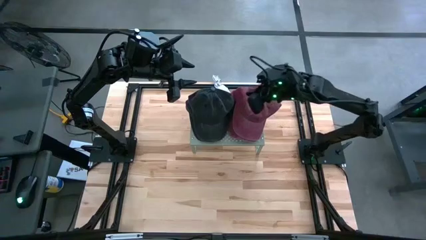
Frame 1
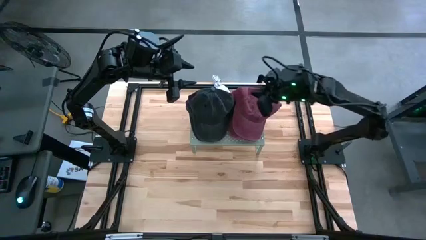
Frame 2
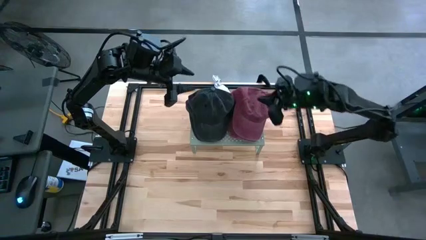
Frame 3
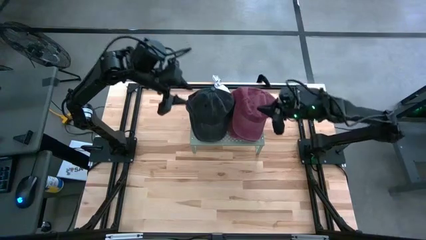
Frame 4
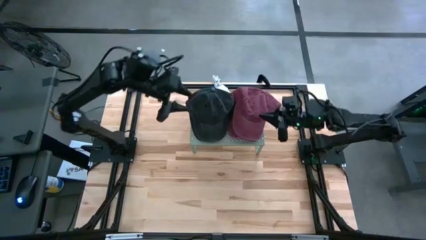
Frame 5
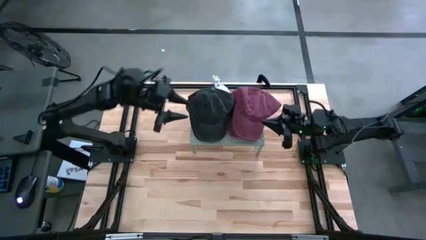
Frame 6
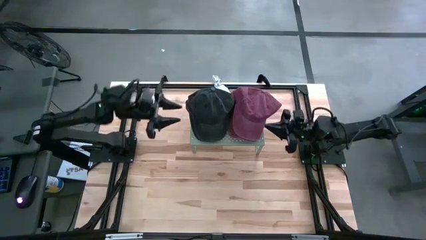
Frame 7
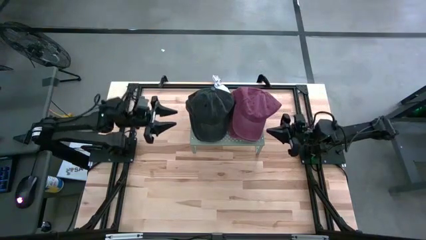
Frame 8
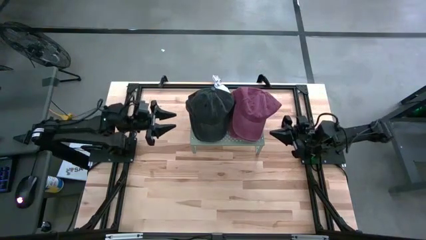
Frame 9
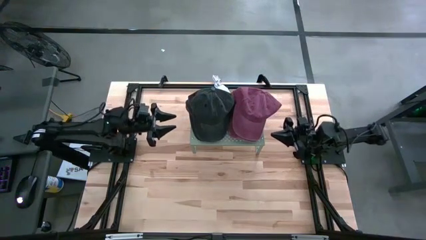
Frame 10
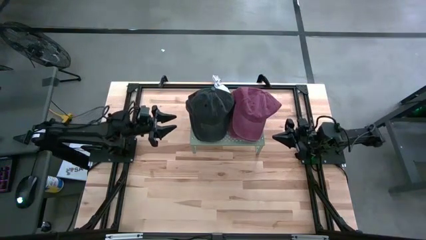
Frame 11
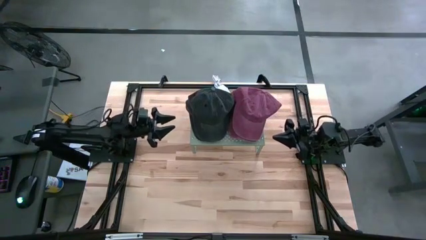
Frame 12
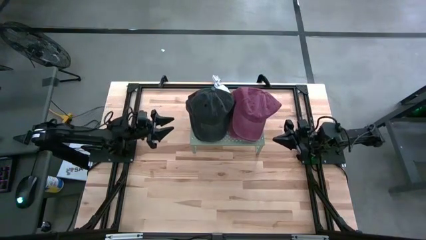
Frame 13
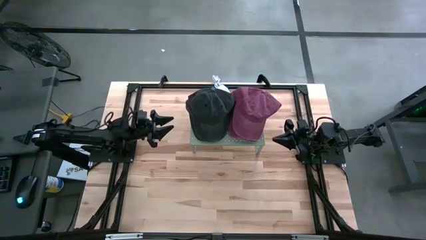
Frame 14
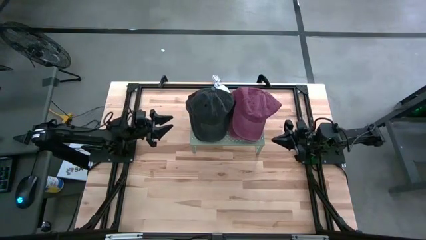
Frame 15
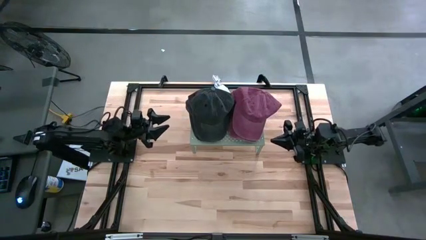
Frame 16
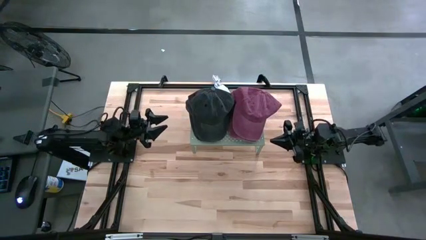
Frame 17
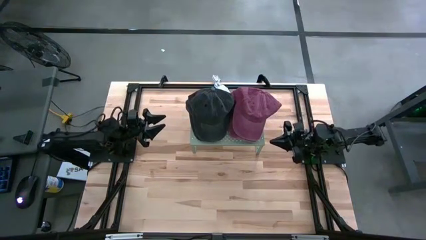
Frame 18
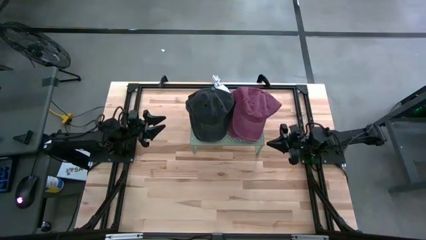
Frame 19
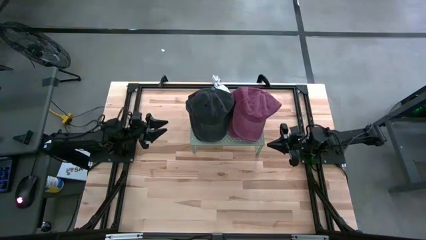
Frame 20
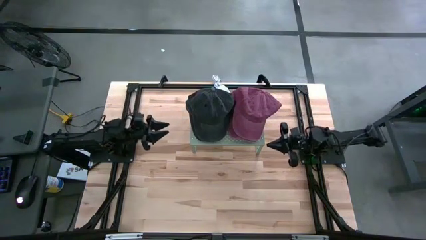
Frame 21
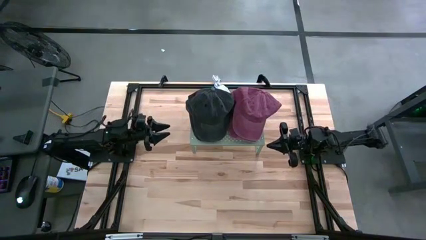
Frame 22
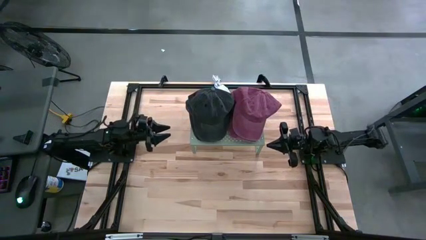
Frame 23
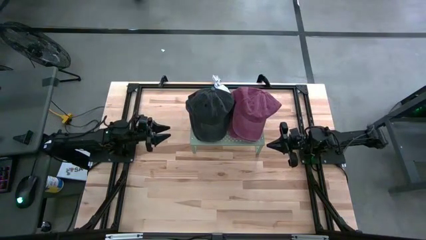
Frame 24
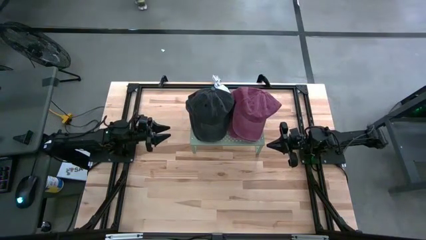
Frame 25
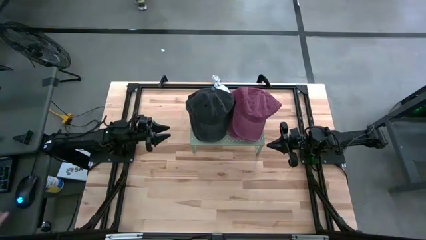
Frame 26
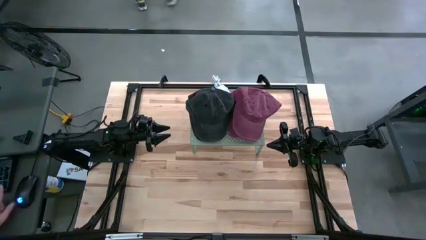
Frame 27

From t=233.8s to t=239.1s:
Task: Pick & Place hat
Return to Home Position

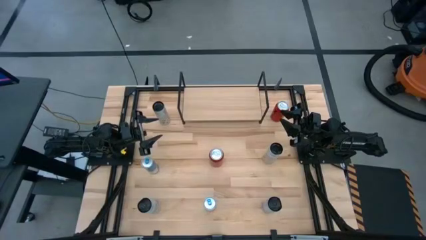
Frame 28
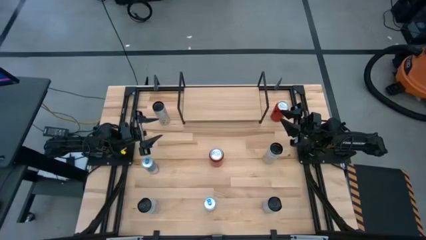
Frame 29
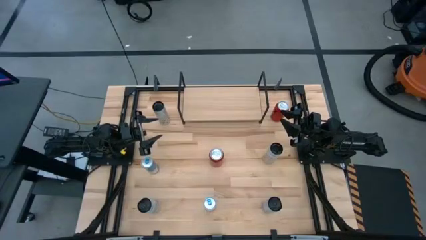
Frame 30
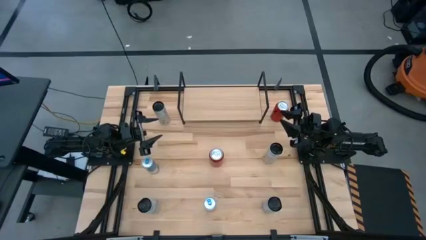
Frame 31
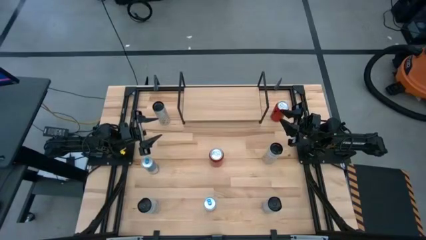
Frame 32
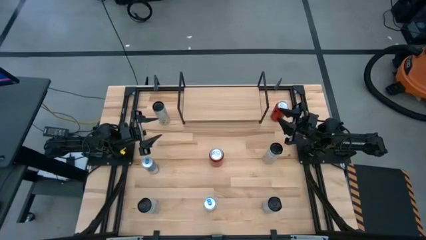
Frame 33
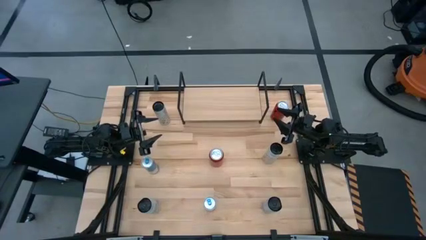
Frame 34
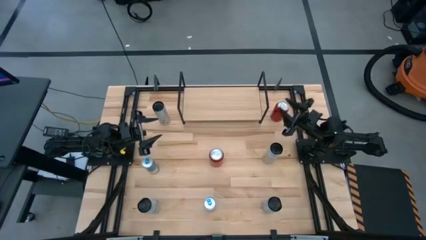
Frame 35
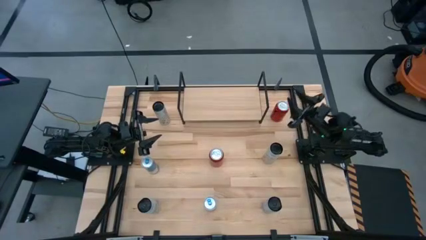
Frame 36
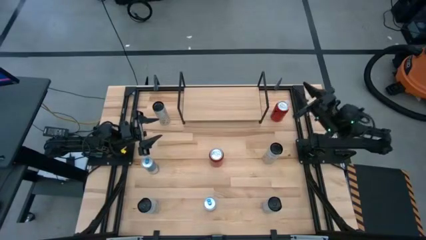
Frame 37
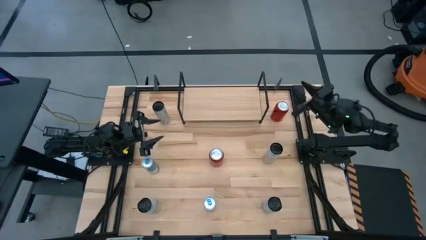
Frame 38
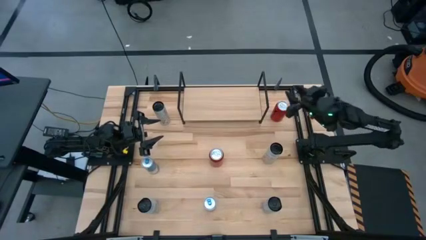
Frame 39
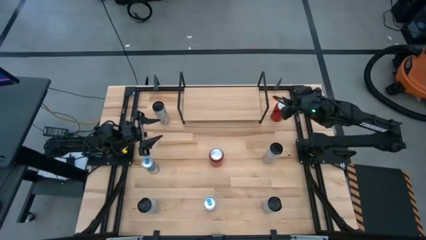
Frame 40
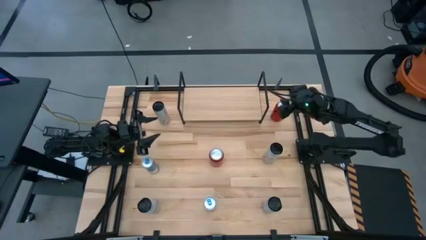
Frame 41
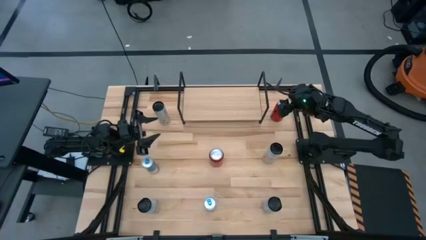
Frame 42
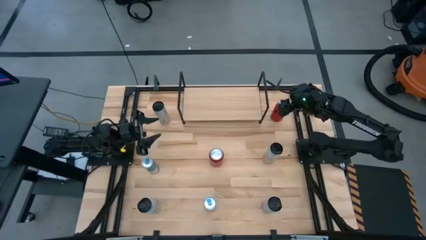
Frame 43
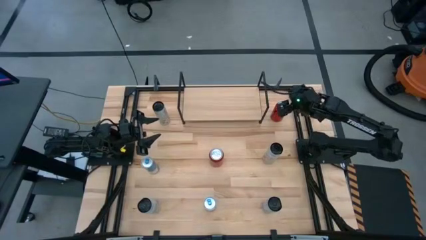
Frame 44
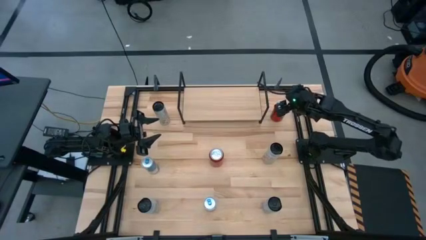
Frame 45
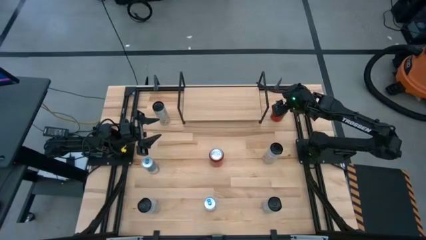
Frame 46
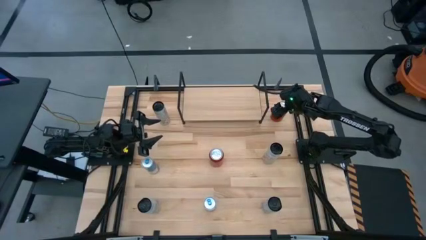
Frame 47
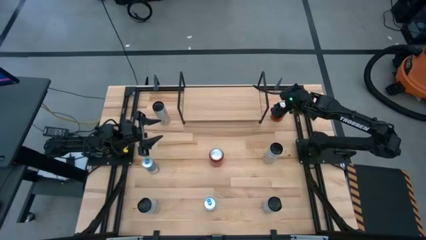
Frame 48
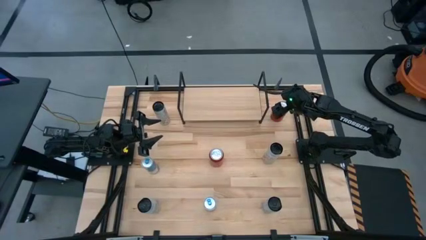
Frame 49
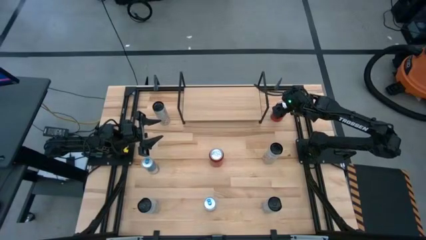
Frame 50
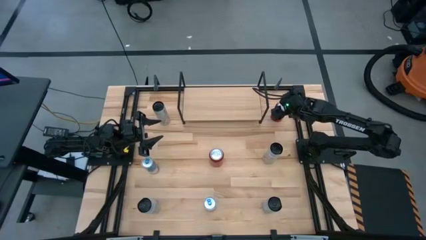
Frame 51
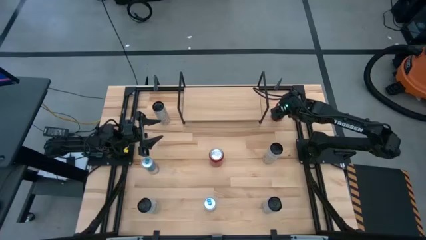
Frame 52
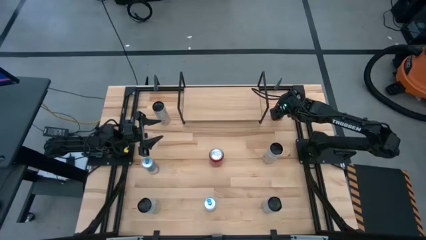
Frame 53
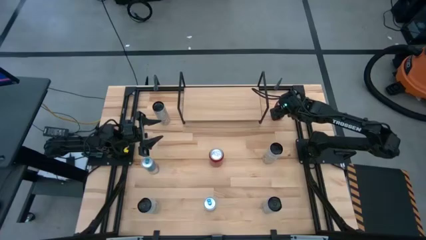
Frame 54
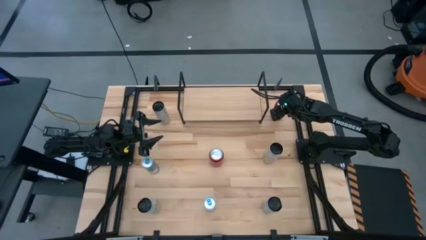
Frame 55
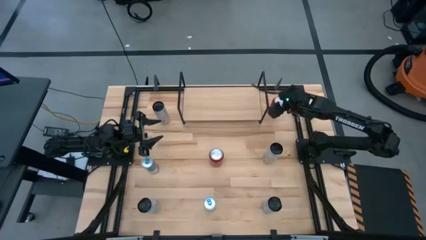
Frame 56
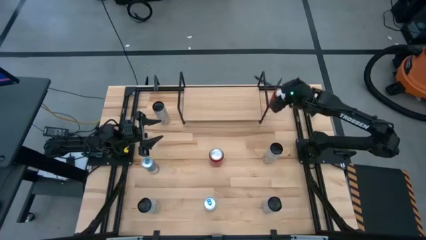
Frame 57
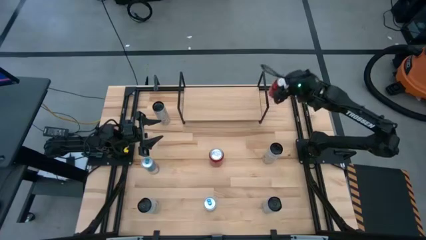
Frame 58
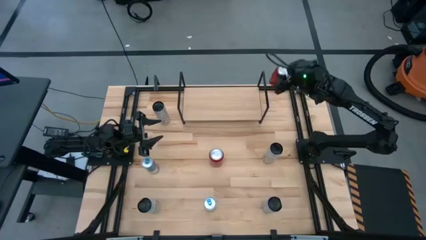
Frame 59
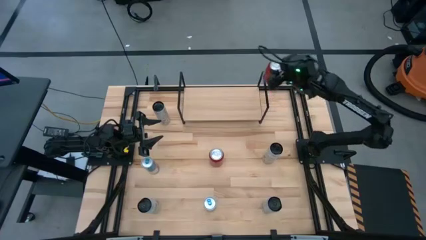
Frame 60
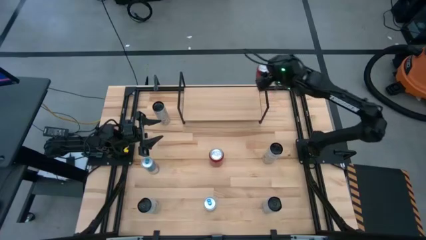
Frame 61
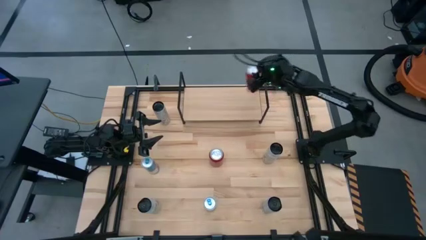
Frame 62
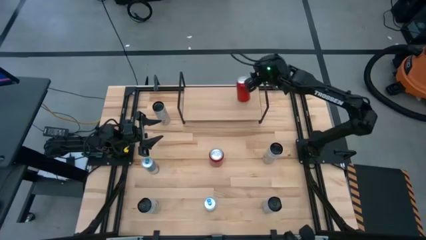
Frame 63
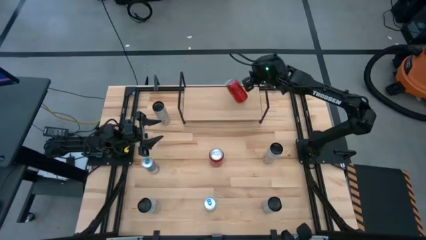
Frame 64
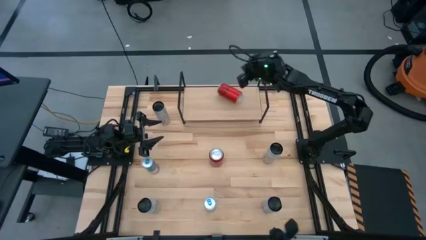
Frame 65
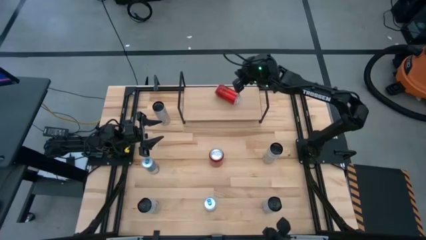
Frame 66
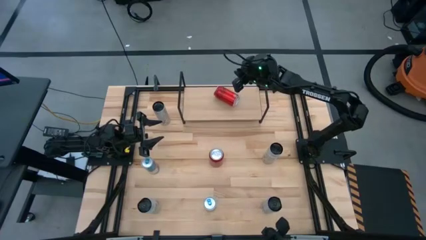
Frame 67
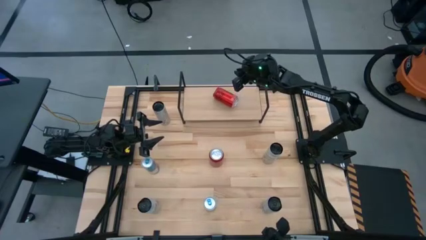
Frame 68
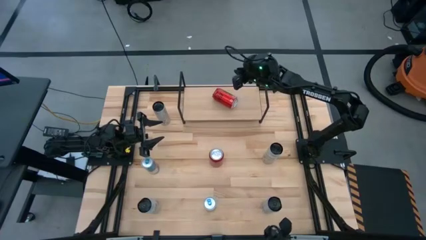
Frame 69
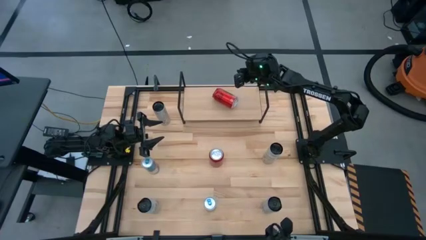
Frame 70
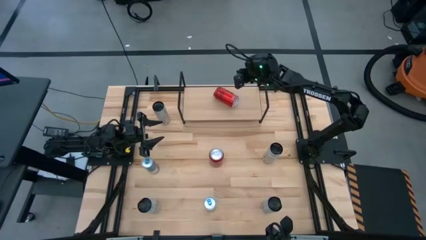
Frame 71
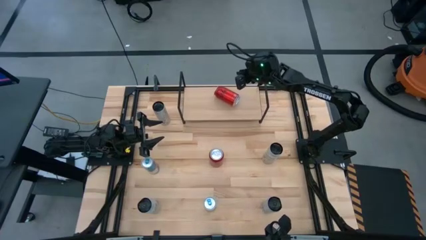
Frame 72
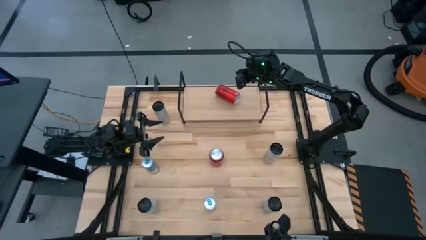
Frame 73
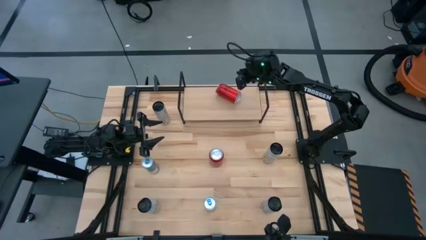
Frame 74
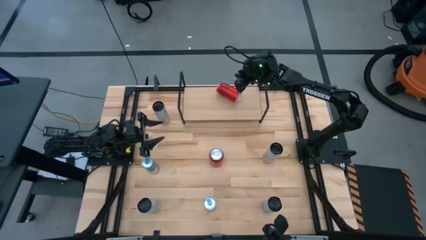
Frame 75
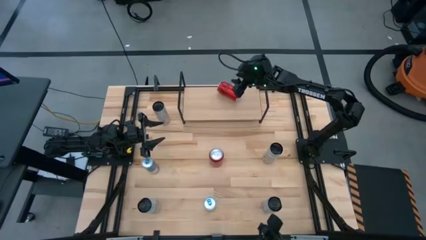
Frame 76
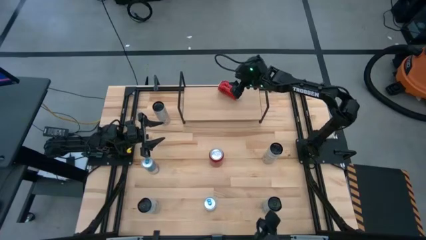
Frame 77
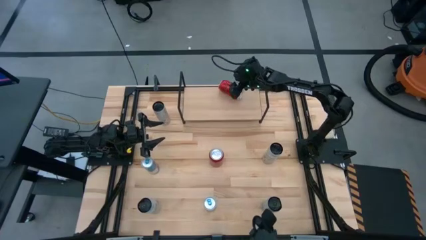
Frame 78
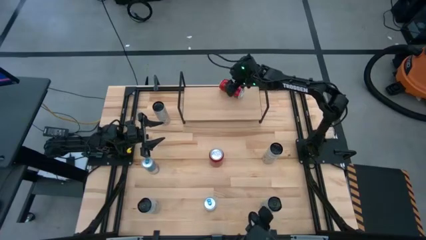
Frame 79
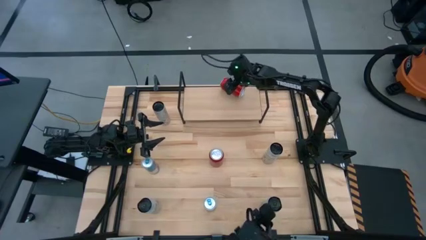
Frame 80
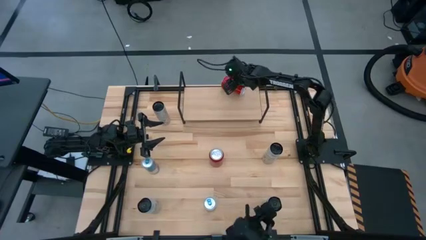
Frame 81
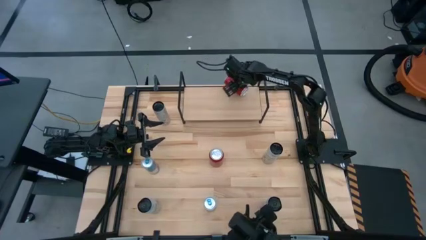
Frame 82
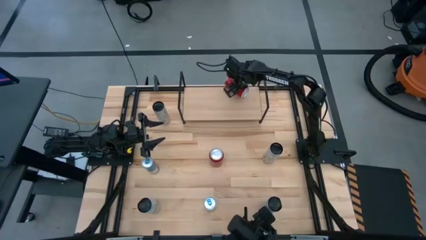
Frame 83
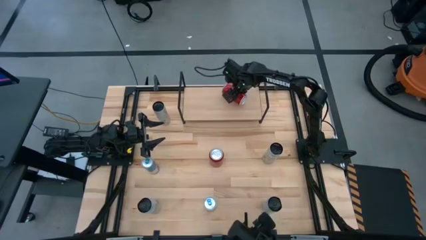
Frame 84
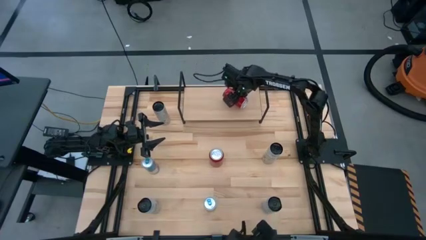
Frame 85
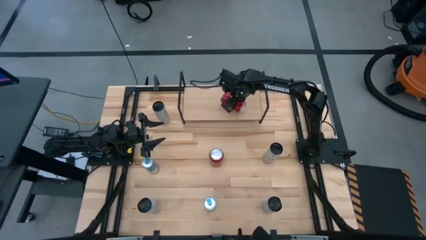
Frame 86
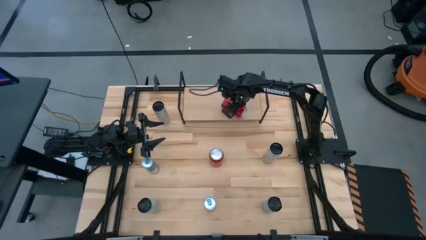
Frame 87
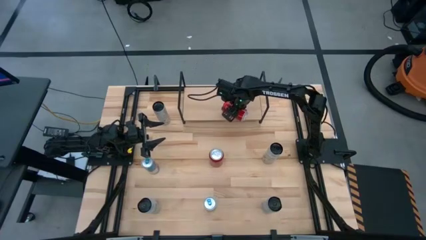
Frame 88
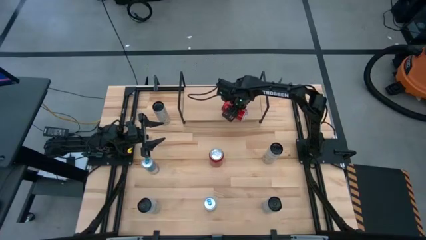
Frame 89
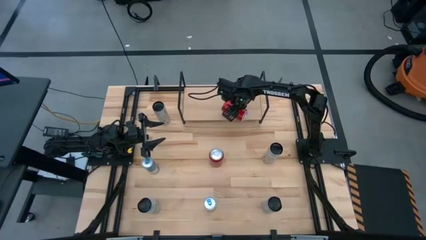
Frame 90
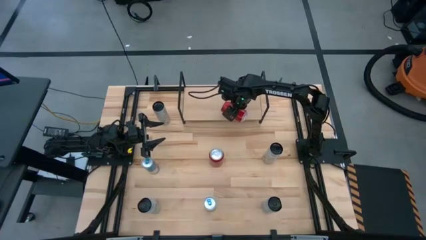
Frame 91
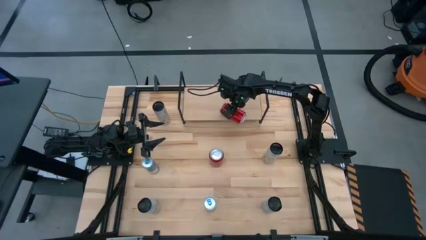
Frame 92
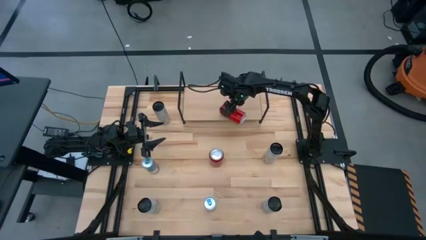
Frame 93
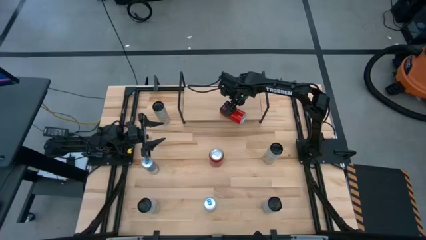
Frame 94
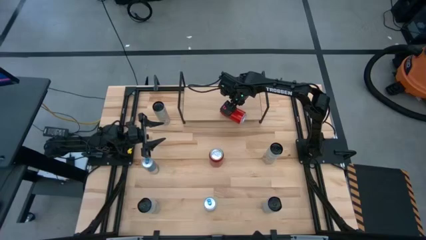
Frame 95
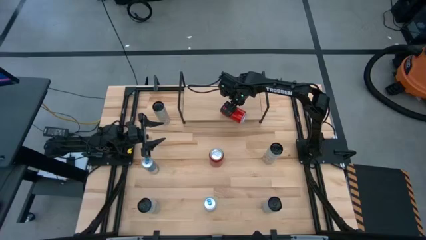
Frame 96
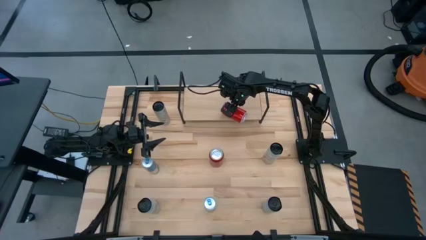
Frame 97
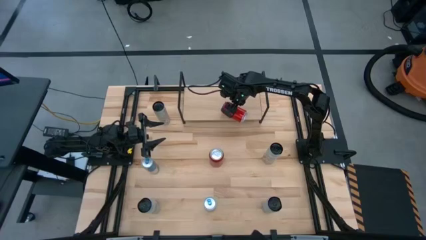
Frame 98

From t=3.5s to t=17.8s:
Task: Place canned beverage on shelf
Put the right red soda can on the shelf
